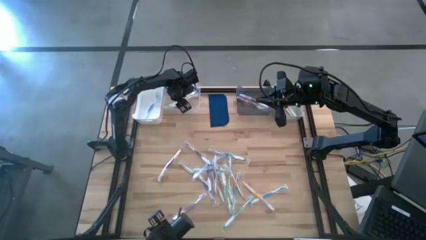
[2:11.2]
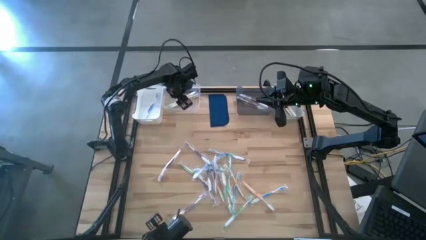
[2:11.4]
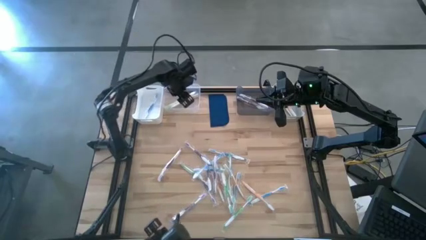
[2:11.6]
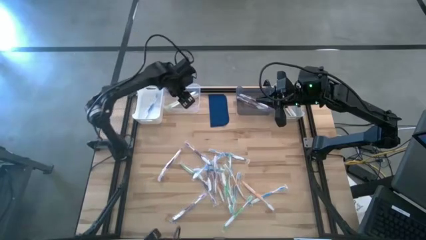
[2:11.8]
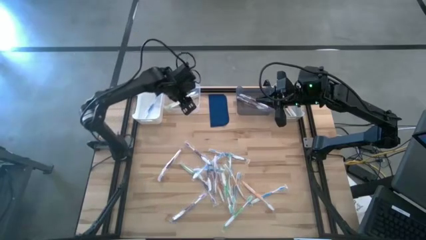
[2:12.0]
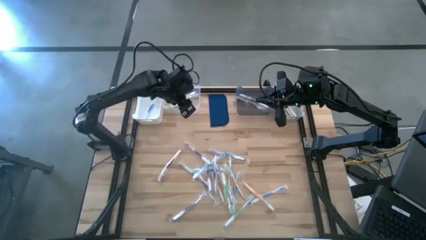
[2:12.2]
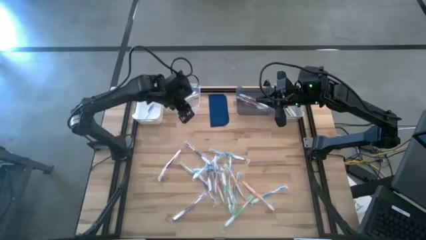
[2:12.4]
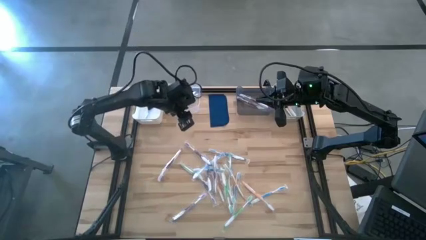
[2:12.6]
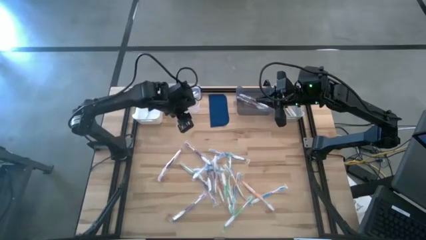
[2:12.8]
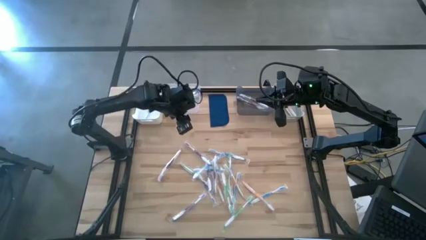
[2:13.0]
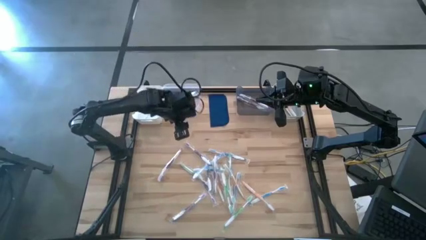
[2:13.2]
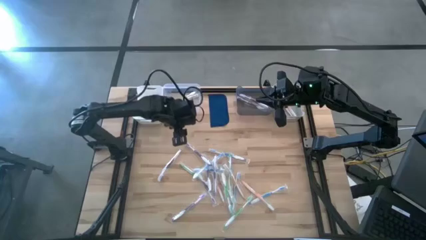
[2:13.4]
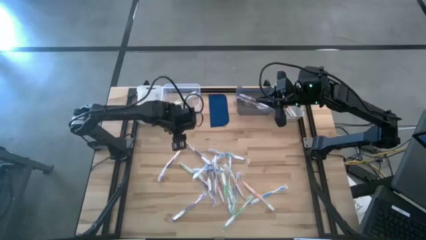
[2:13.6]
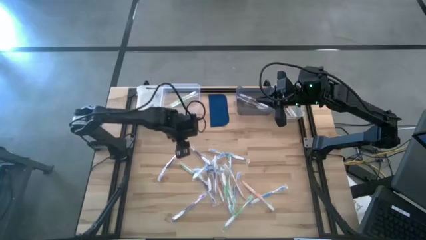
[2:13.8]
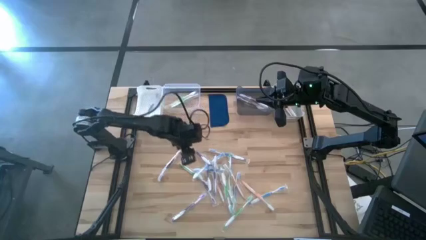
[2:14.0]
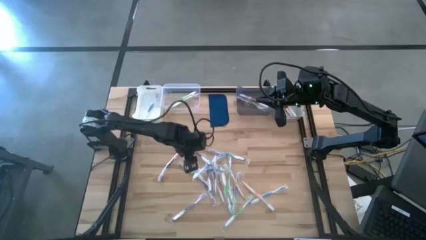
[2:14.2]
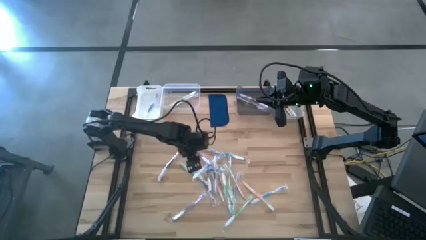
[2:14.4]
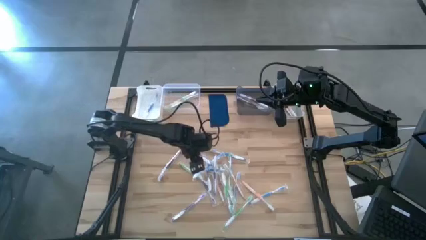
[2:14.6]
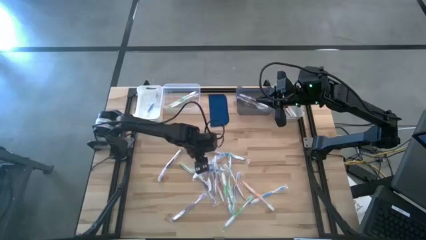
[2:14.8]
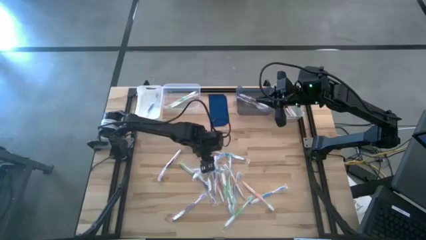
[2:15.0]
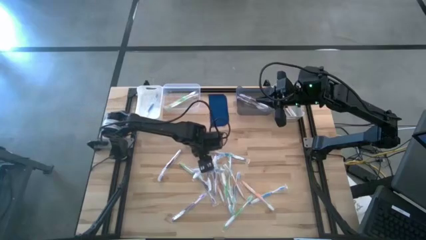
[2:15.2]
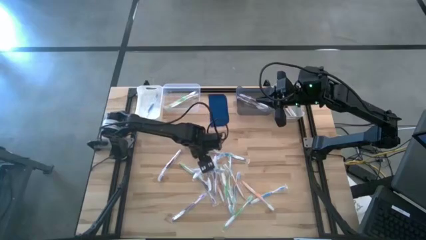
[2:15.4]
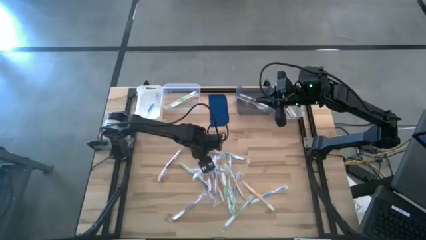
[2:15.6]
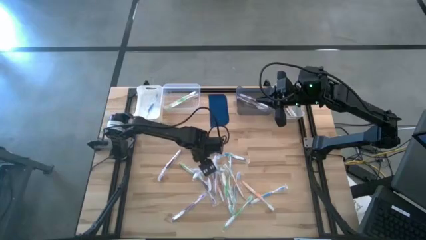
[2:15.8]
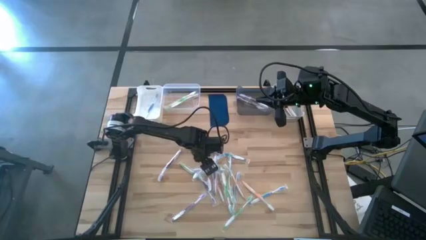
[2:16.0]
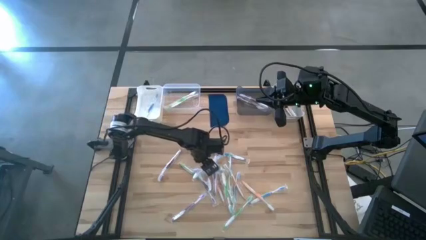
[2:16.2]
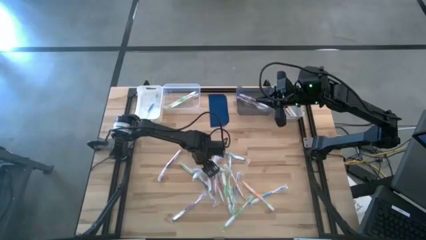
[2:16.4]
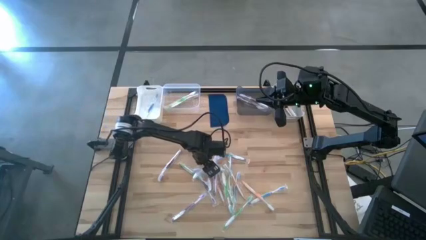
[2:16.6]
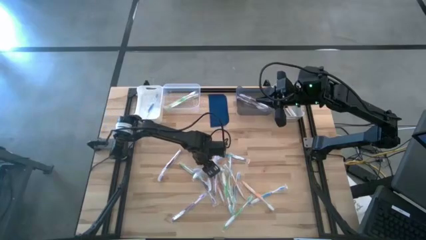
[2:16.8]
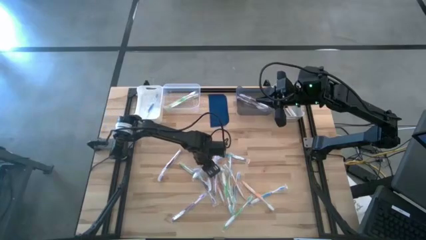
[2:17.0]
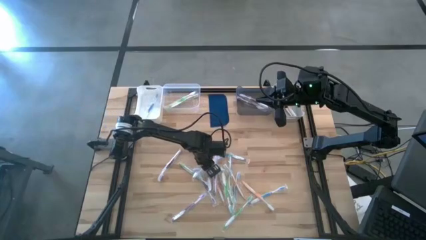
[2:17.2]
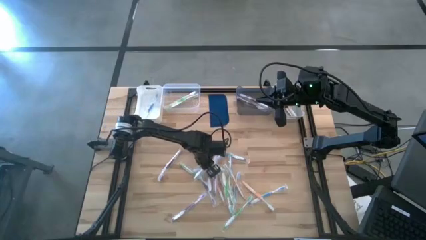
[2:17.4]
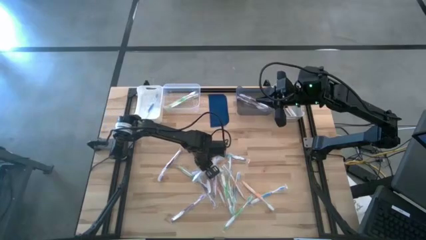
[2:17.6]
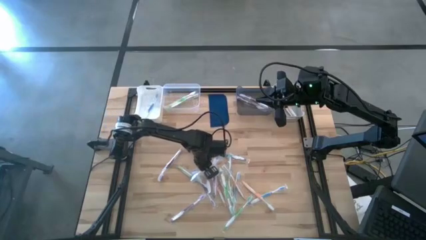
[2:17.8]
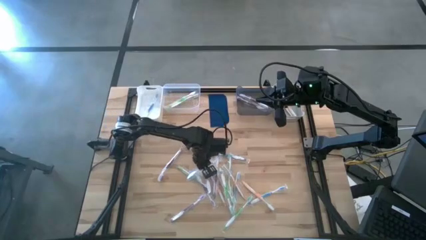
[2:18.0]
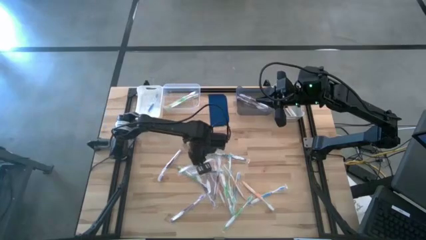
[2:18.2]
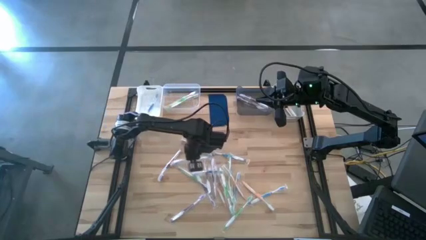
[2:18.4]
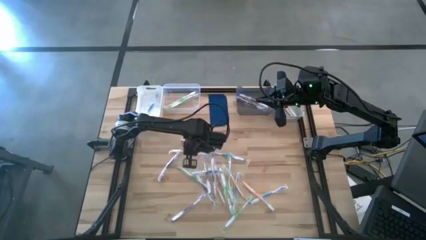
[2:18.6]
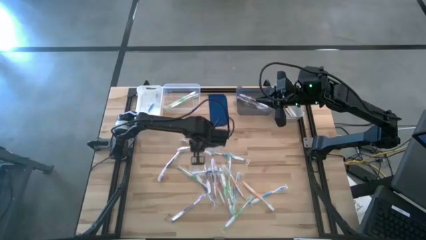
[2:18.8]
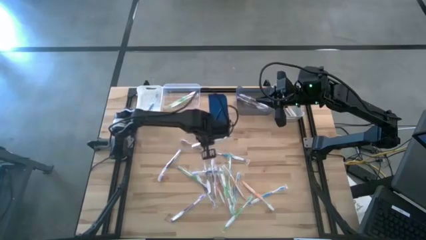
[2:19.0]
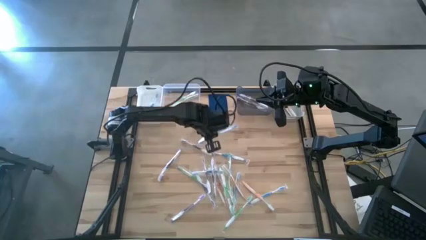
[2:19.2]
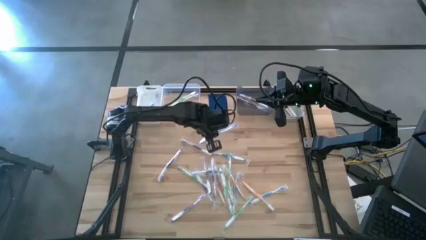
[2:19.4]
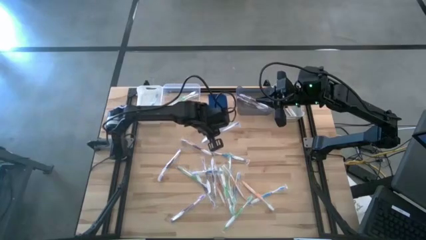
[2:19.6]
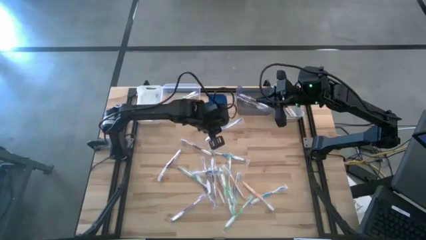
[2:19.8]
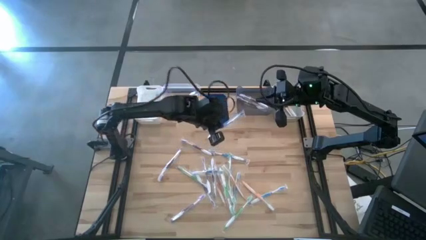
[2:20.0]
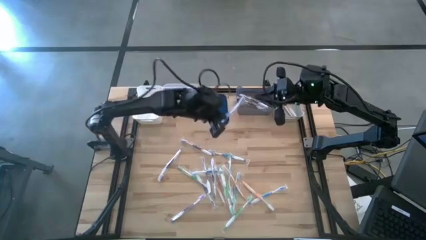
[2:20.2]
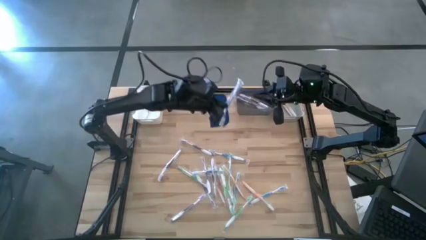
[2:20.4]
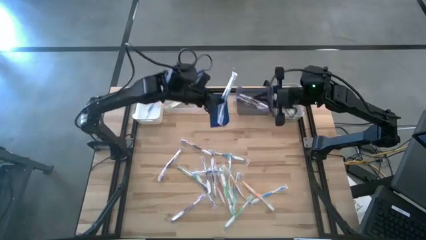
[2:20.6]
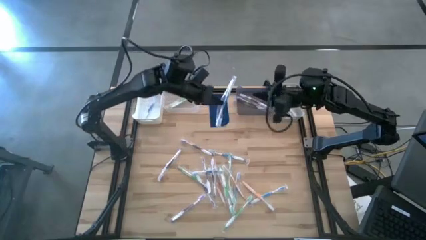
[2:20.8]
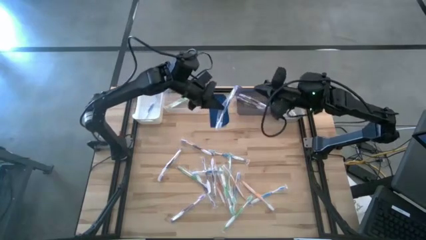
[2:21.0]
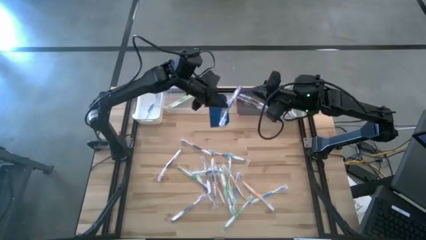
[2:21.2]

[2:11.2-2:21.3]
Task: Pick & Place Toothbrushes
Put the blue toothbrush into the white bin

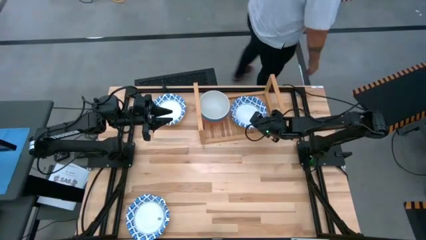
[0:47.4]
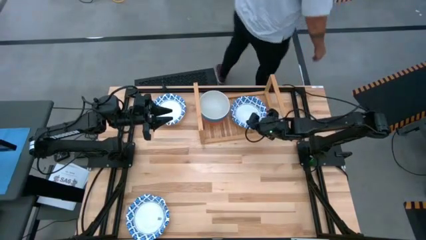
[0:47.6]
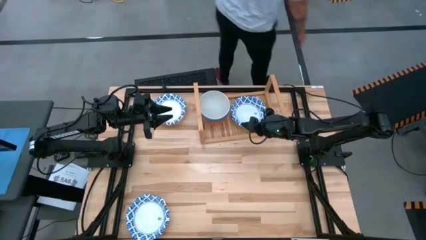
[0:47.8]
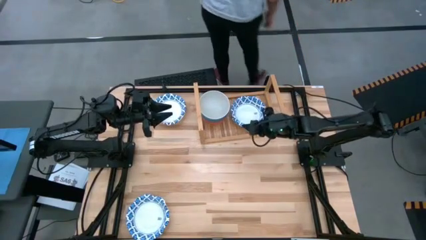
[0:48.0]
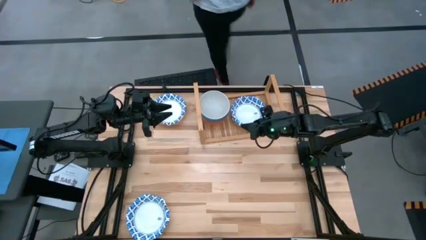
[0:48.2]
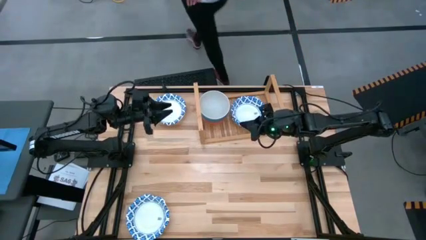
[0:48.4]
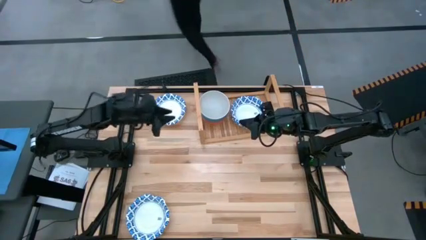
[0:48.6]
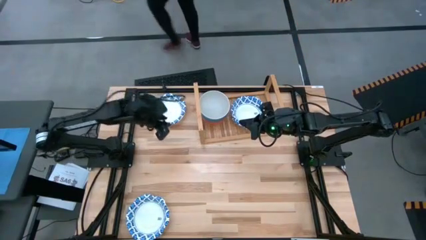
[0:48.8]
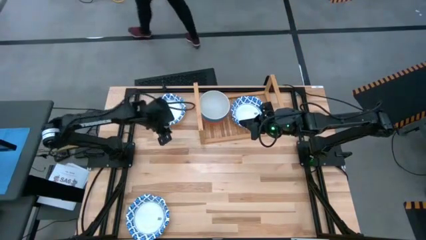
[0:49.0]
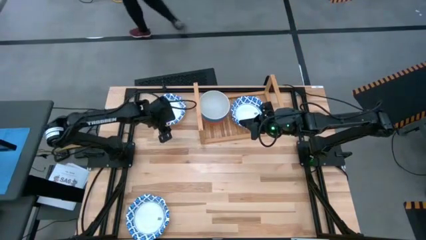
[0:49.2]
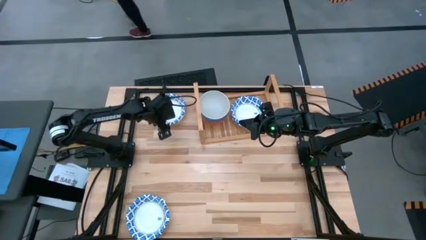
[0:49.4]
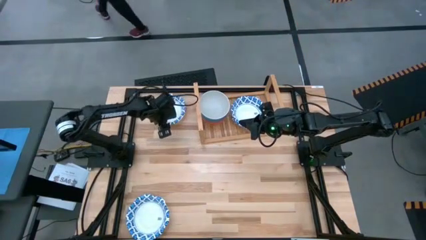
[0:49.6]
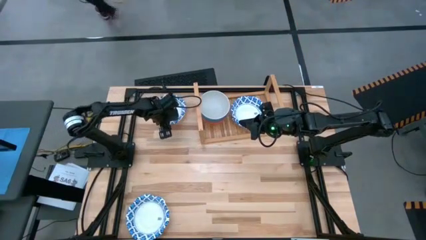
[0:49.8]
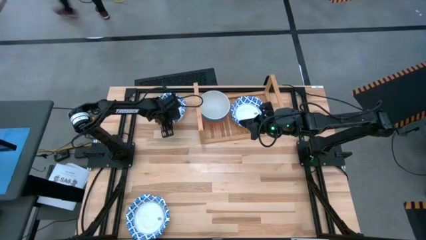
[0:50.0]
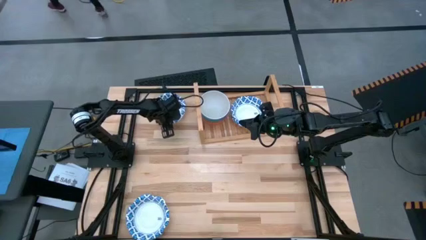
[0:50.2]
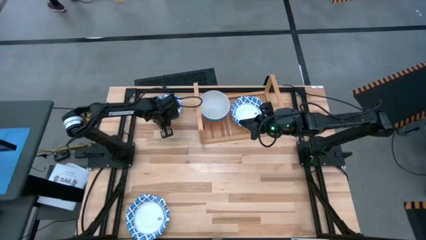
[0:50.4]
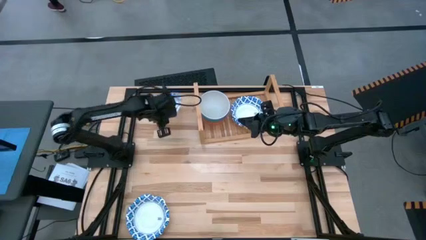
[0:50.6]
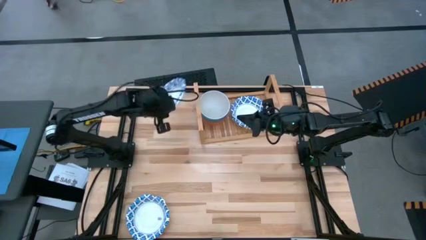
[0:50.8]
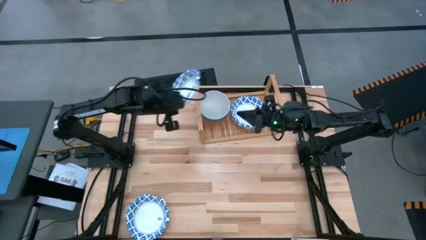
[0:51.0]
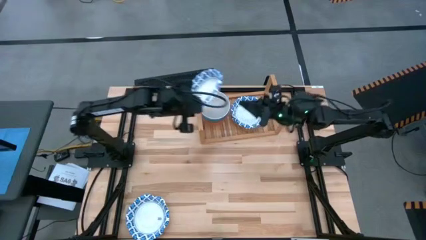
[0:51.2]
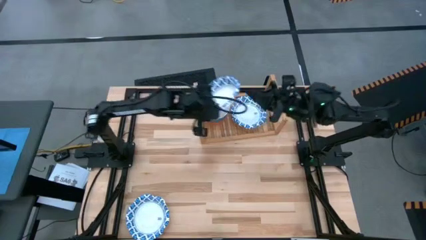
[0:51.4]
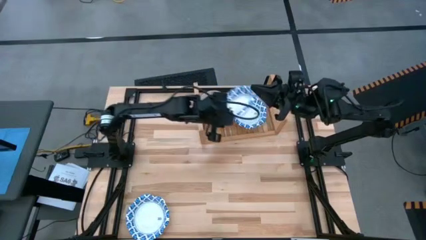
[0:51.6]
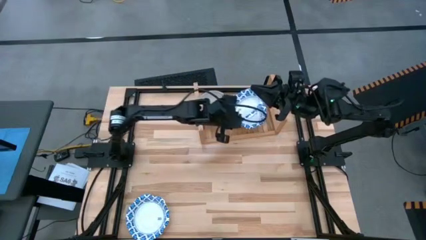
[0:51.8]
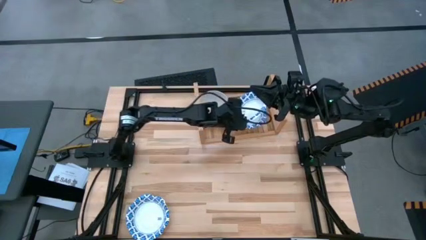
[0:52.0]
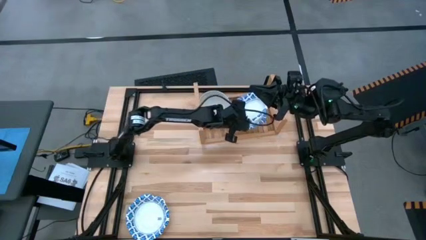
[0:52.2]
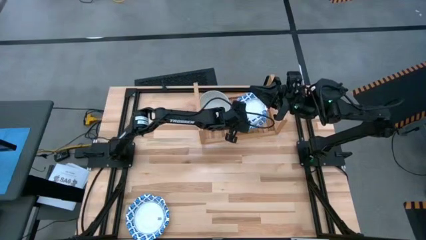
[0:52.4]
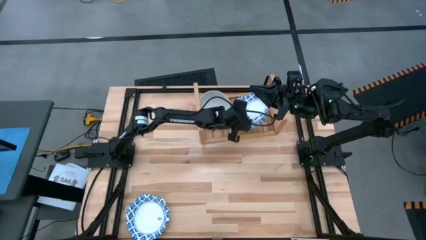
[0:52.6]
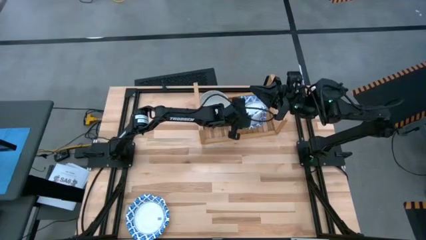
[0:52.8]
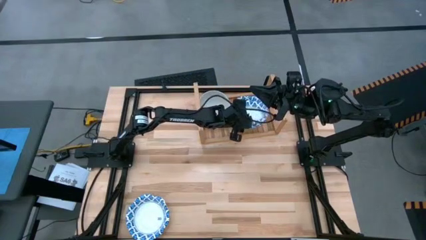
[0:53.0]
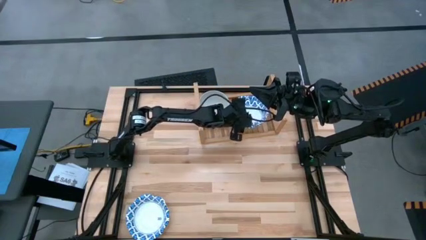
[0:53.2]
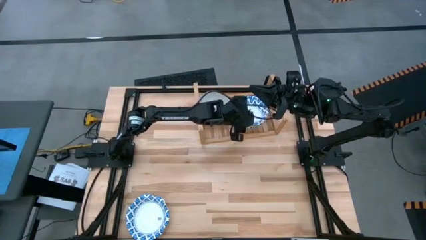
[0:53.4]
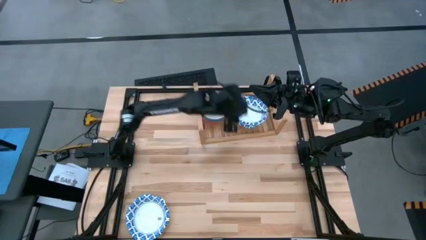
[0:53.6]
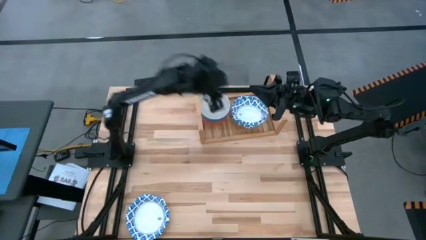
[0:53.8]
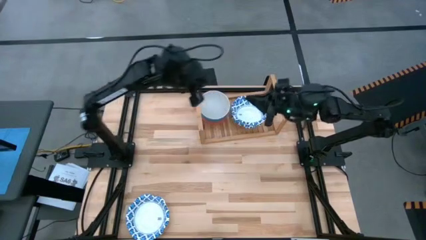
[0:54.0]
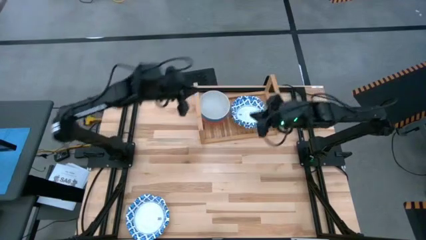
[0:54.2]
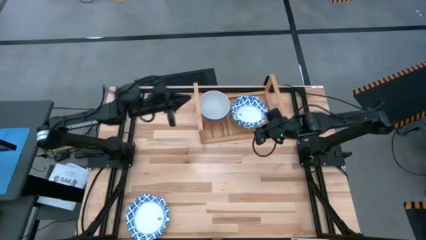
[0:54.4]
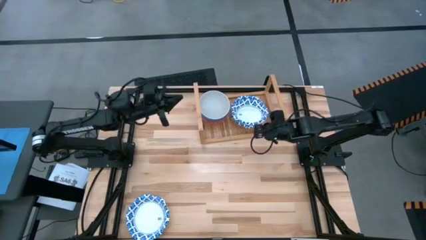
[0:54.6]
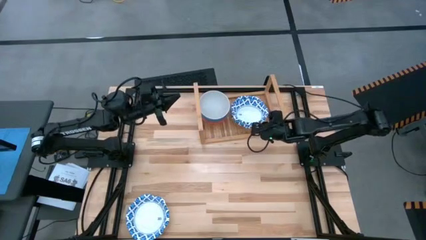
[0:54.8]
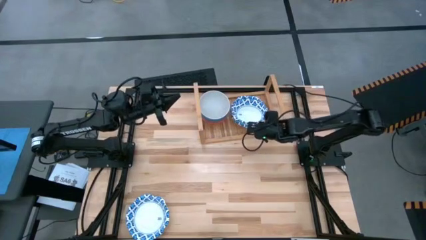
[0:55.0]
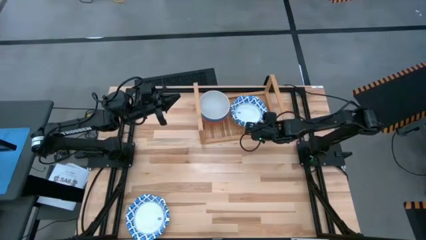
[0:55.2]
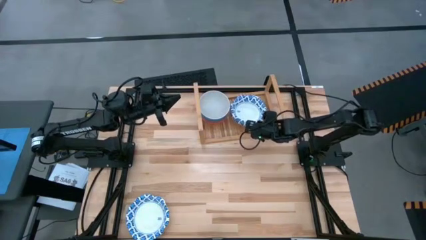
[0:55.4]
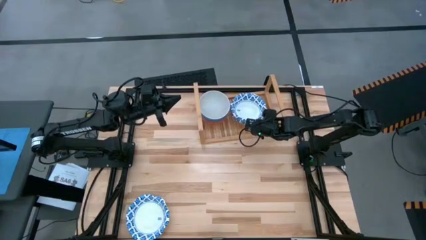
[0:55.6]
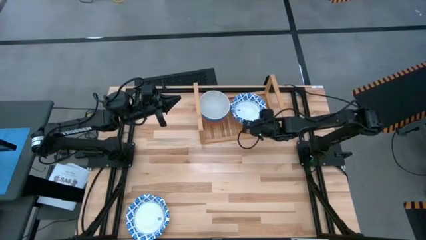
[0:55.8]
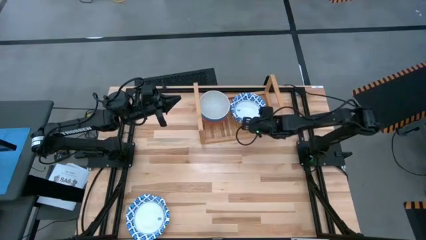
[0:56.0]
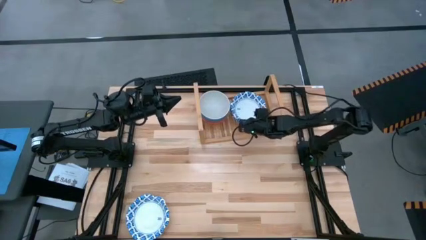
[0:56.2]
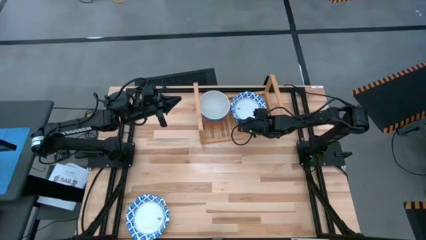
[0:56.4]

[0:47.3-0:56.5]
Task: Place and stack bowls onto a shelf
Stack the top blue patterned bowl on top of the blue patterned bowl on the shelf
